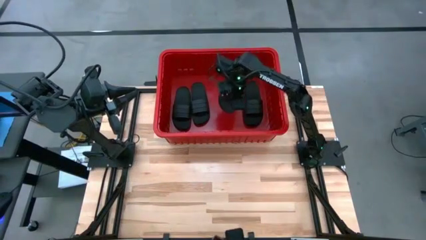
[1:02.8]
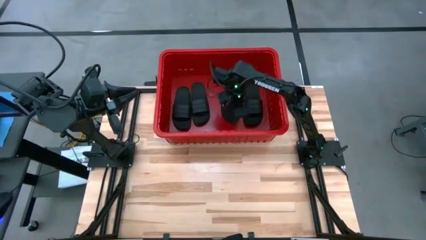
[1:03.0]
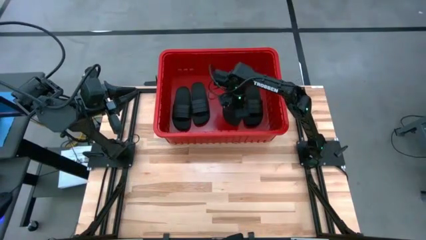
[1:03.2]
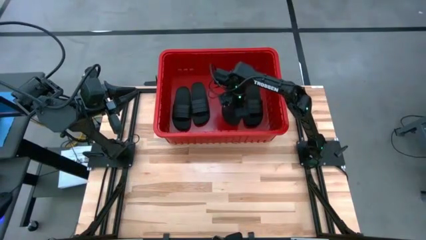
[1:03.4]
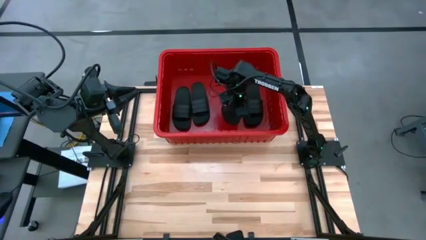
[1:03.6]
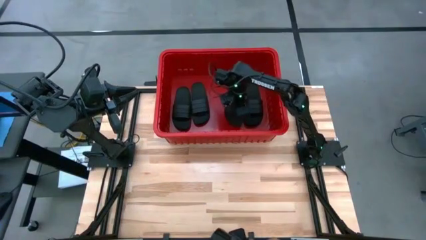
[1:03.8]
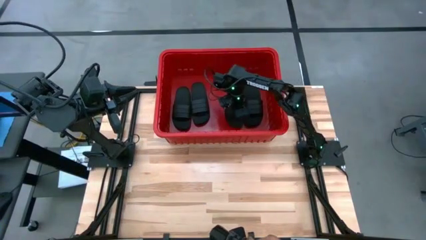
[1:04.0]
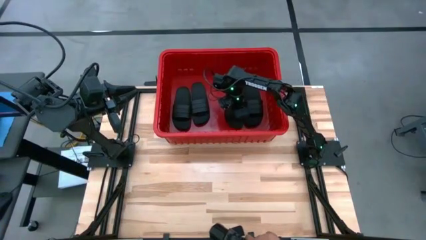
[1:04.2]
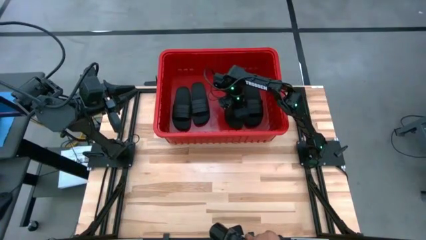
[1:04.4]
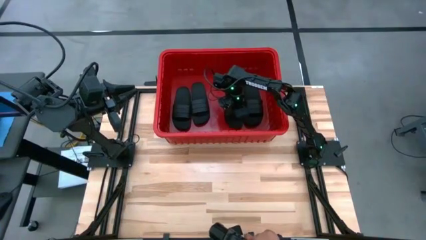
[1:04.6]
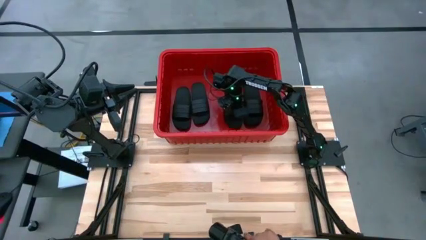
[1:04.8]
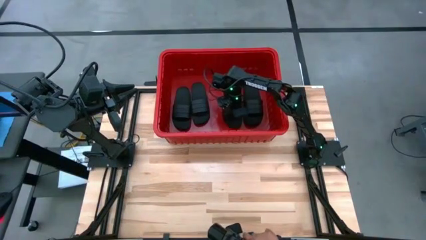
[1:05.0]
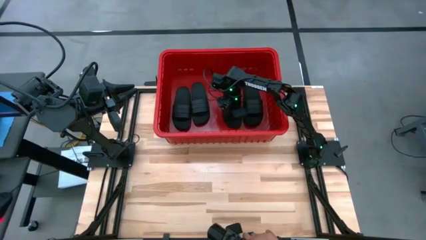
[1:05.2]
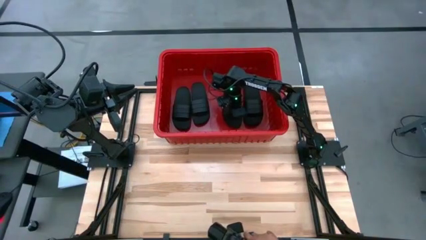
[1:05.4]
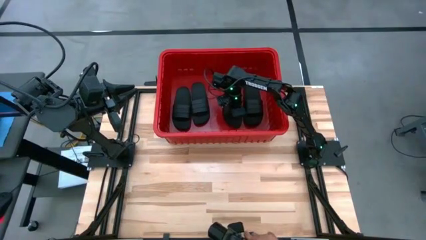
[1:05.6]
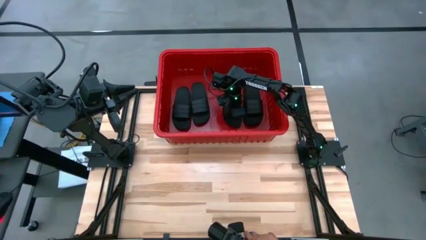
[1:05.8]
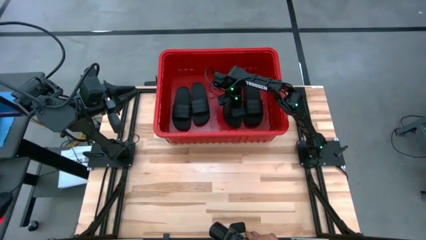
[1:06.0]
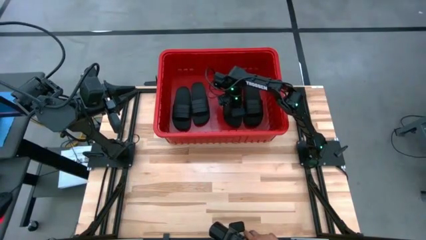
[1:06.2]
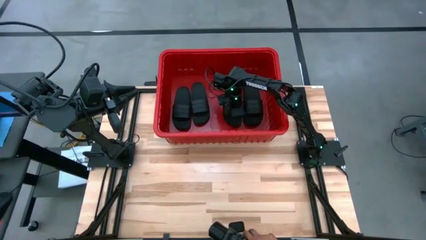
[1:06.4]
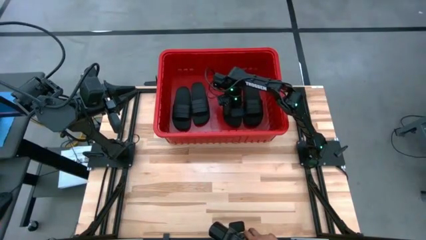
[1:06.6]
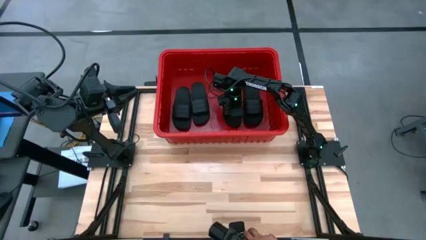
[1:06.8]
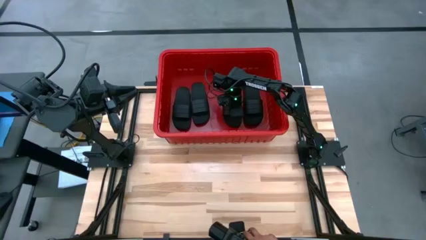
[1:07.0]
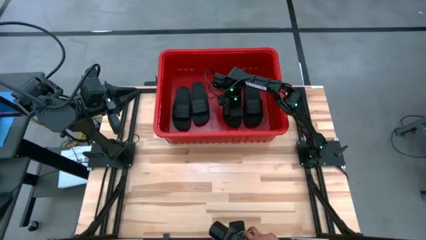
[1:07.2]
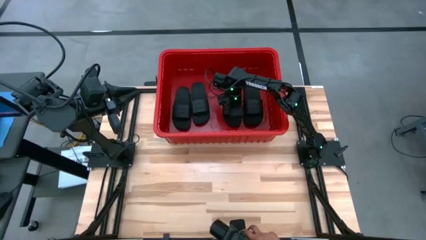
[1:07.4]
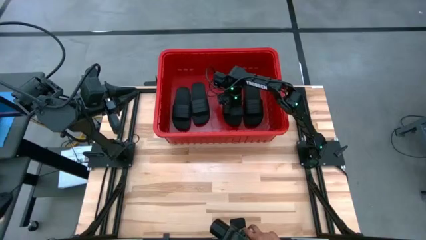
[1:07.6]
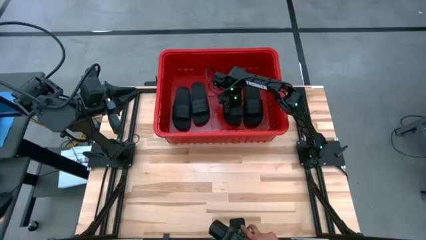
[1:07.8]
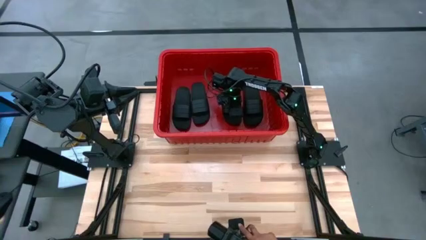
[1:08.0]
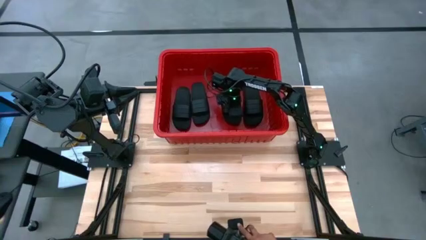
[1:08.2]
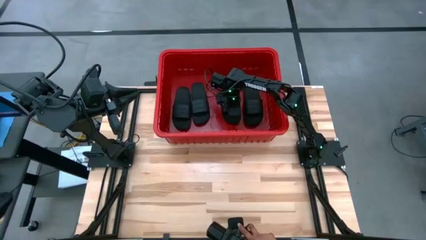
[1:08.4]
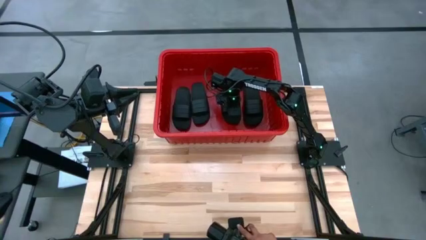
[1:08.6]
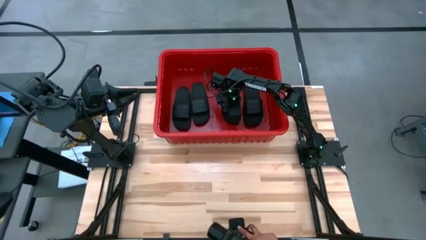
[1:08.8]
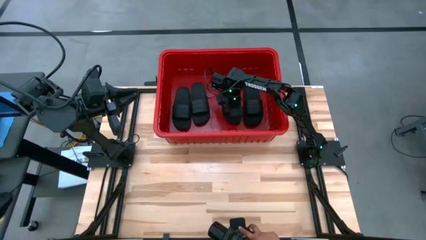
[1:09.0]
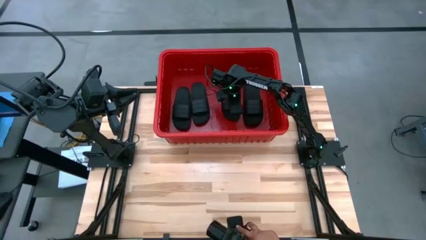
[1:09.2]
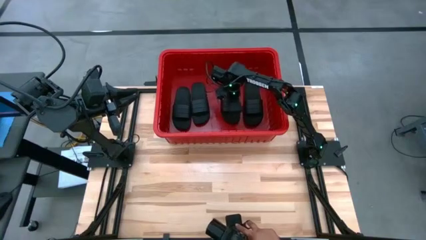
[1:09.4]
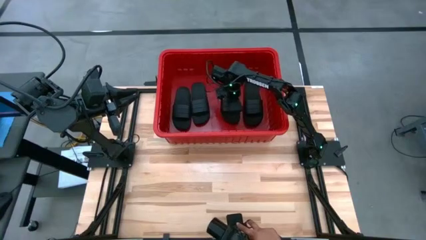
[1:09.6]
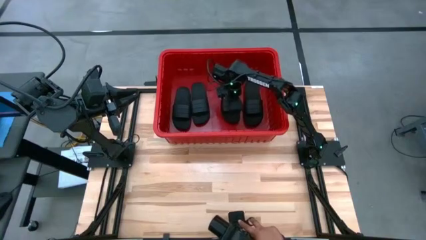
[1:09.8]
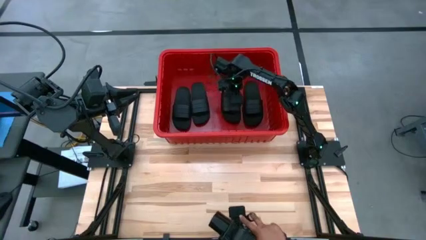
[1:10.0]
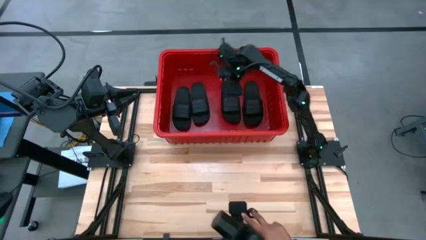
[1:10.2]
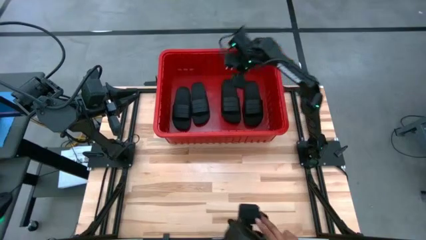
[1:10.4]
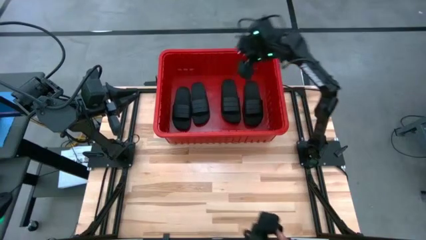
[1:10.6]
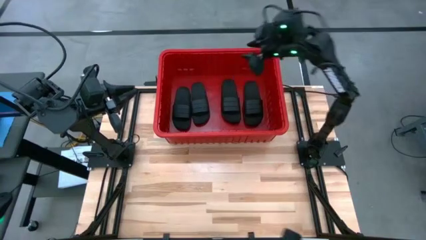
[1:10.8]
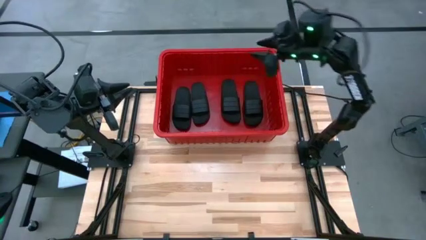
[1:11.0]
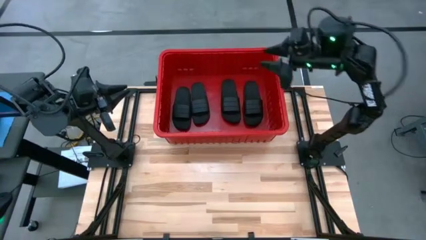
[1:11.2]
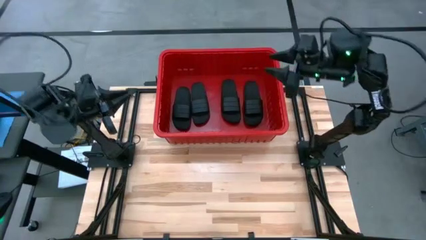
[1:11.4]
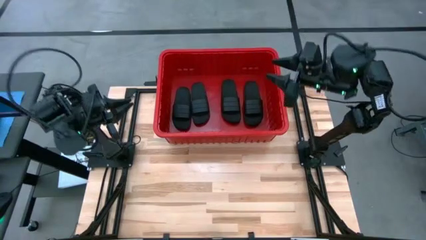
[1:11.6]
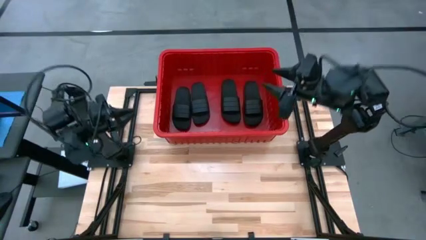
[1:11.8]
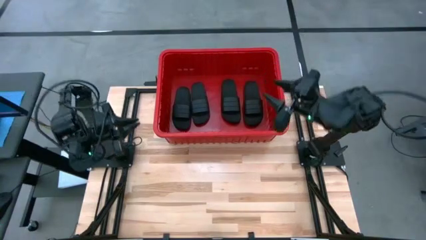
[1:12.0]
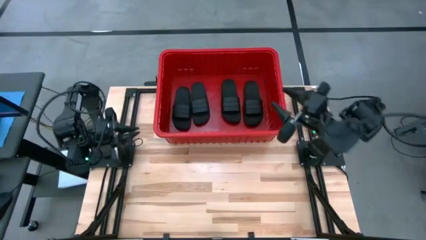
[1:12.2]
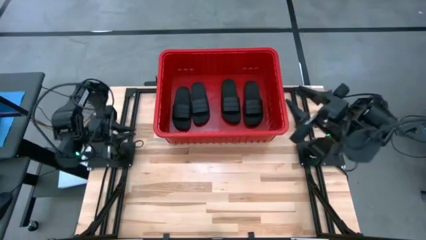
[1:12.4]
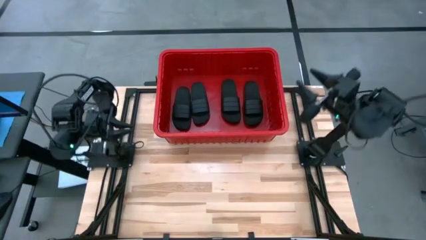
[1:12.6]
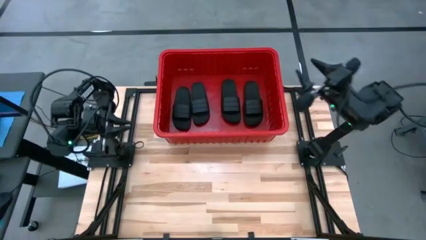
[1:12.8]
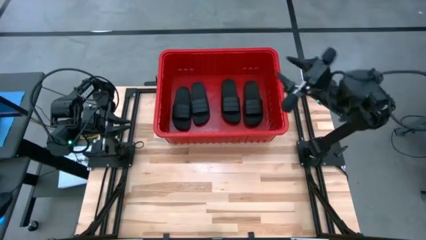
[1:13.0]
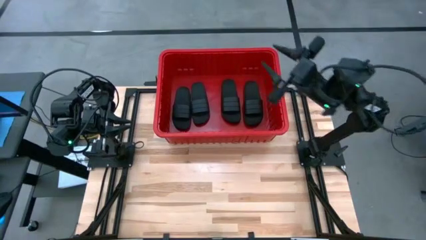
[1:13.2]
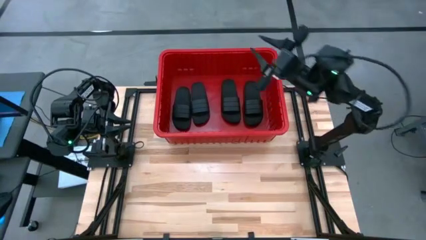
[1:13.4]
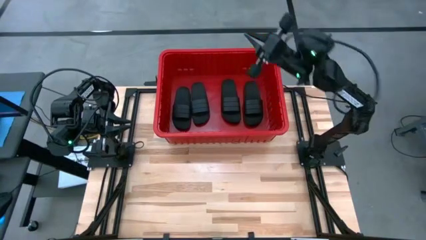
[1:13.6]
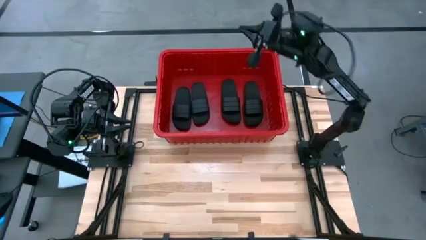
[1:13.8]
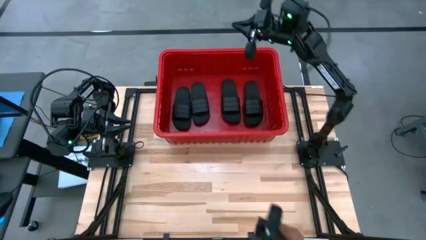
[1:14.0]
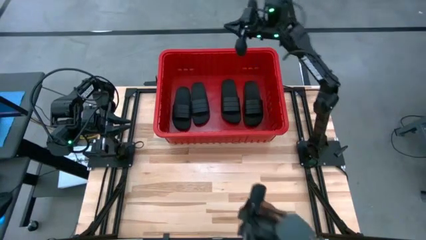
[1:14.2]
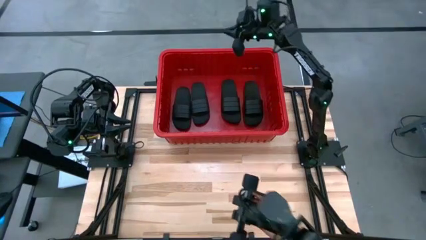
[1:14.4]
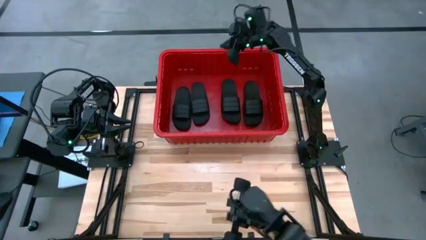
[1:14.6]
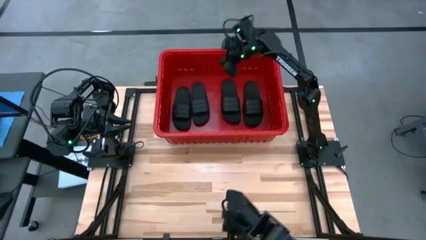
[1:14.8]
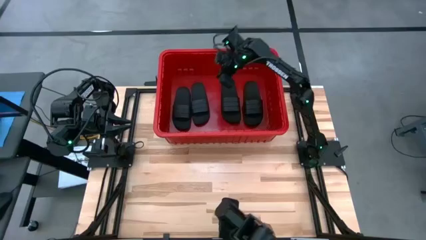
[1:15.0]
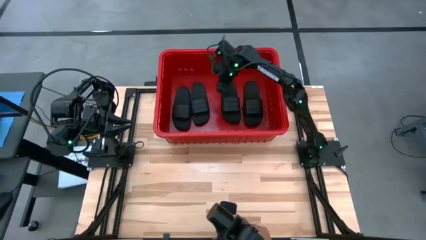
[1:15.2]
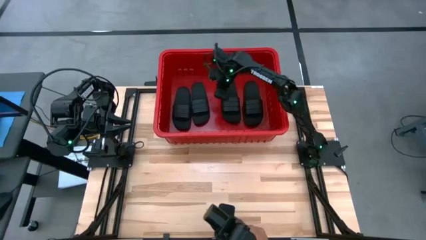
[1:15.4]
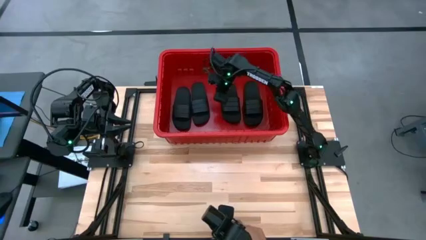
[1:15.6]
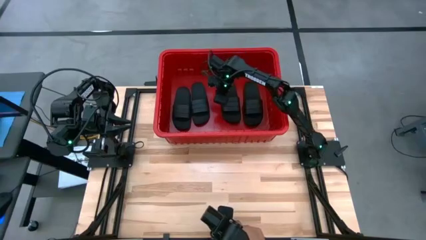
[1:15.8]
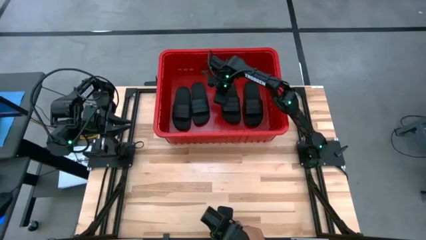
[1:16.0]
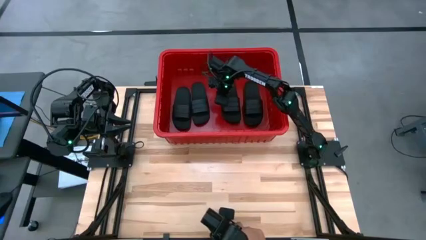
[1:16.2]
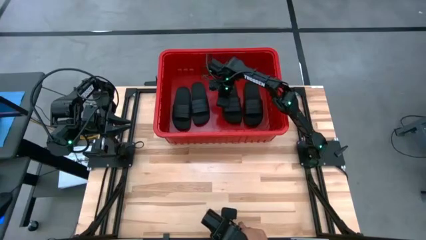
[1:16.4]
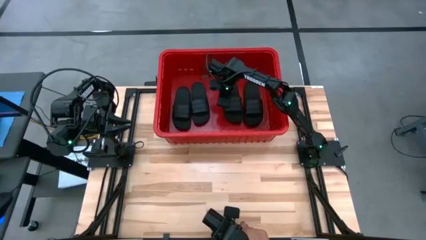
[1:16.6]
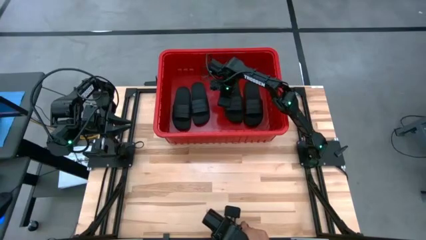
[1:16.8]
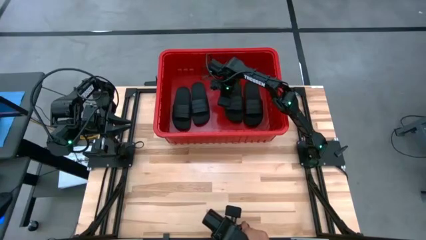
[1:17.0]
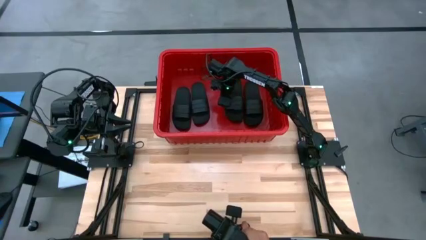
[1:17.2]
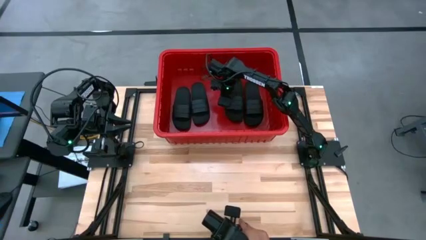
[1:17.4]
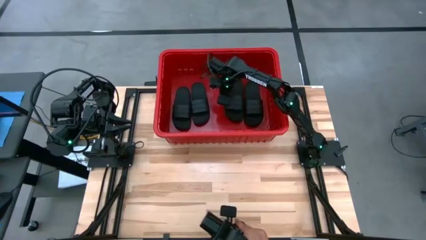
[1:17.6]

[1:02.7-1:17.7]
Task: Pick and place slides into bin
Put the black slide into the red bin

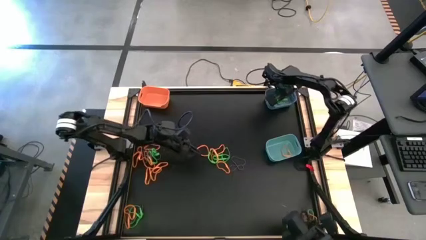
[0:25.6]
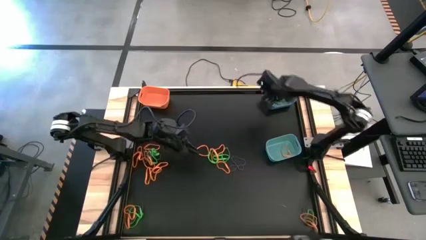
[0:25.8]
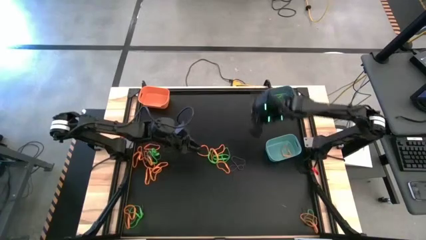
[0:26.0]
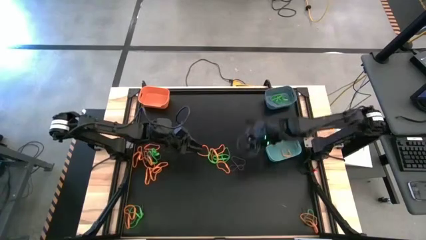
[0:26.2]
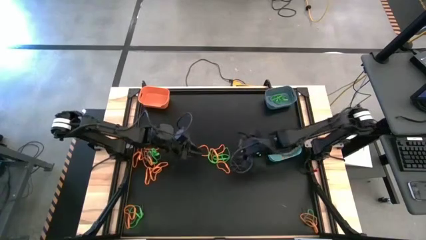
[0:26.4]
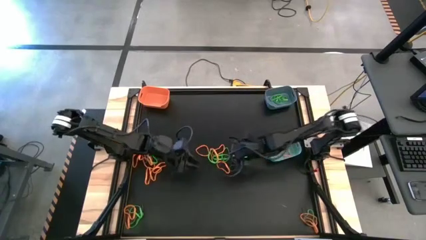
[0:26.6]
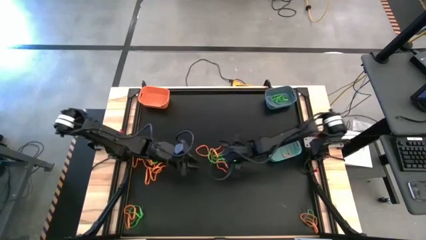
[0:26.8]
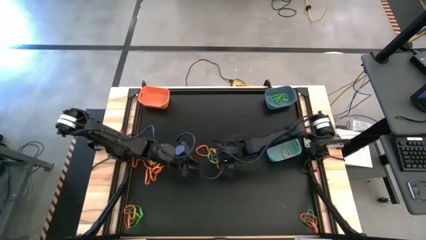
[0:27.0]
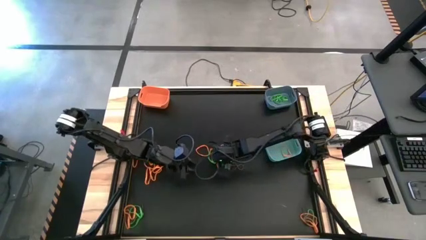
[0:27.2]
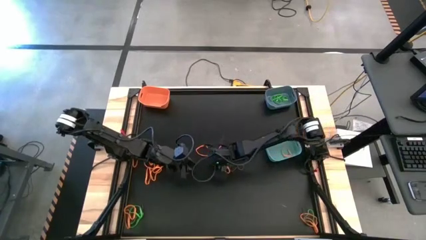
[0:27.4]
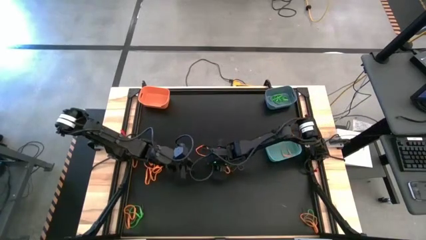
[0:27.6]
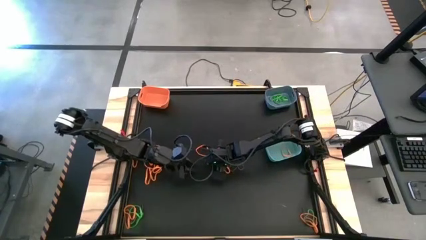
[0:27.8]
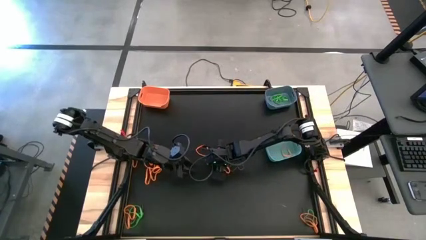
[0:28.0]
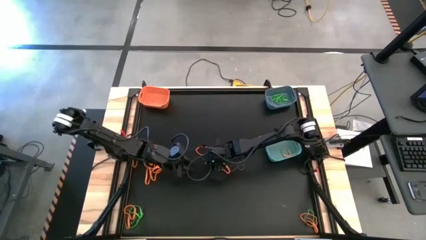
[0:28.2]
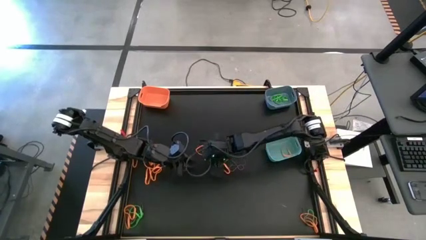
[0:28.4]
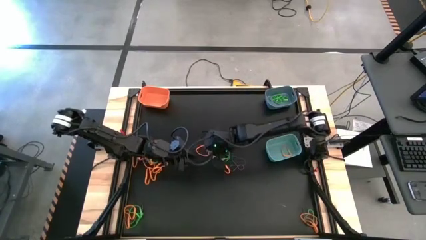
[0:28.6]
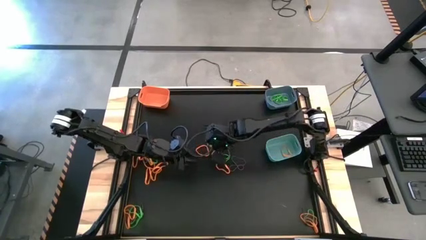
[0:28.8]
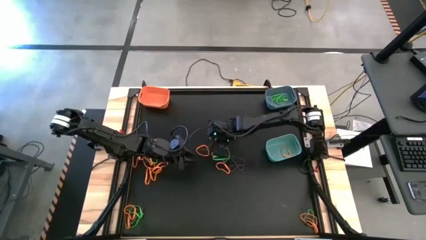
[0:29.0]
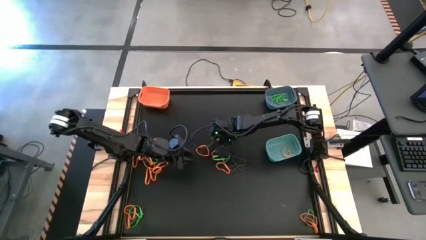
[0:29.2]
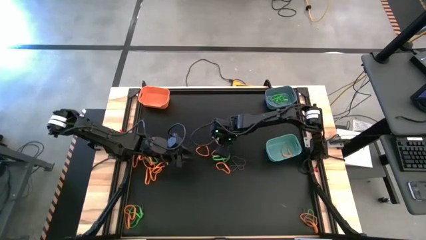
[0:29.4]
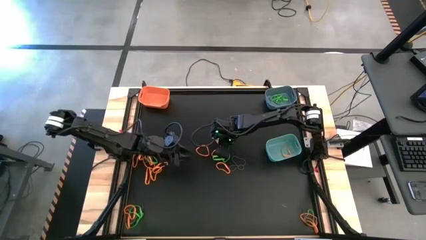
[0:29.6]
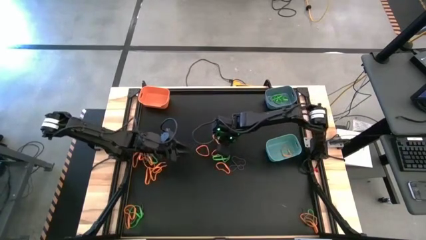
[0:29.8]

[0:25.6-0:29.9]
Task: Sort rubber bands into baskets
Put the green rubber band into the blue bin
